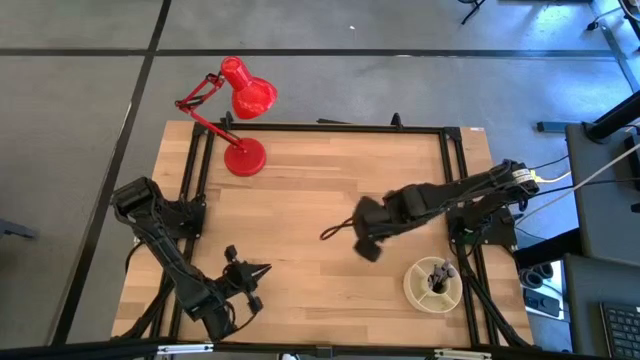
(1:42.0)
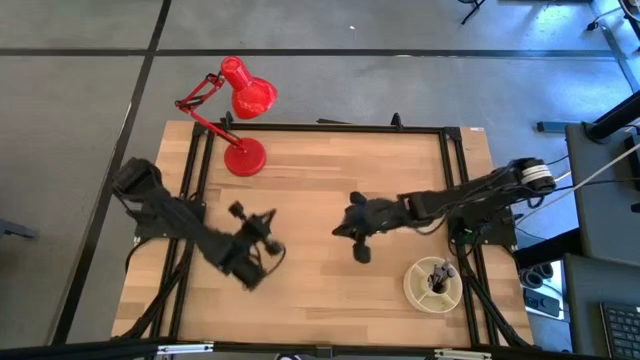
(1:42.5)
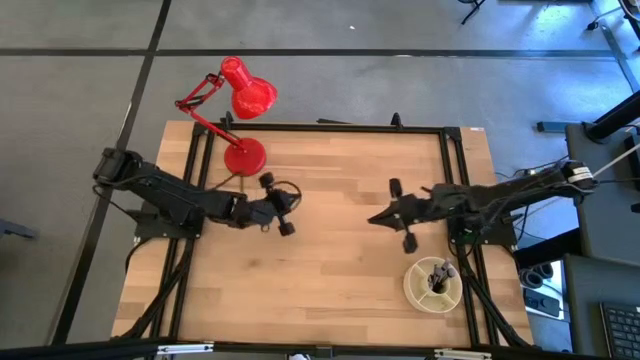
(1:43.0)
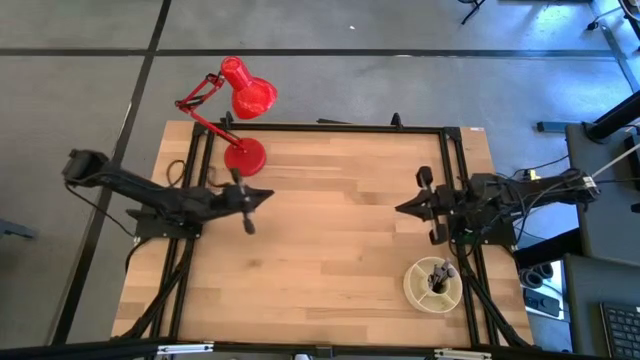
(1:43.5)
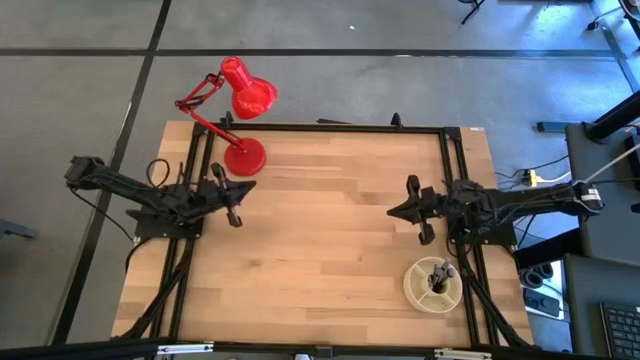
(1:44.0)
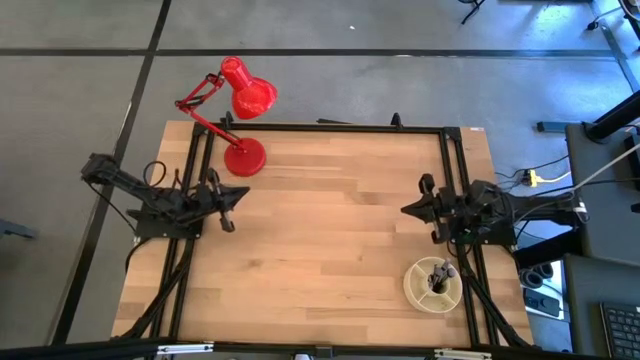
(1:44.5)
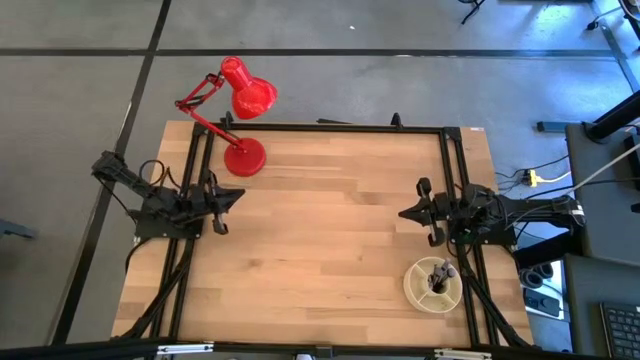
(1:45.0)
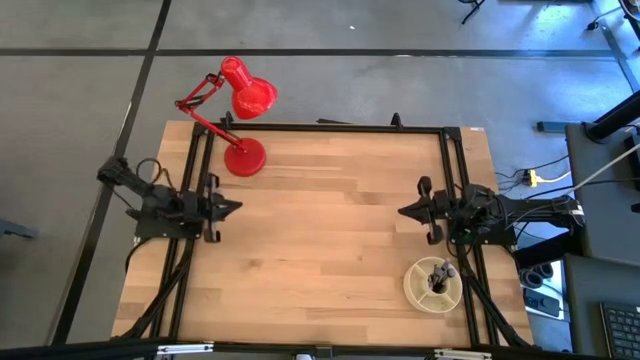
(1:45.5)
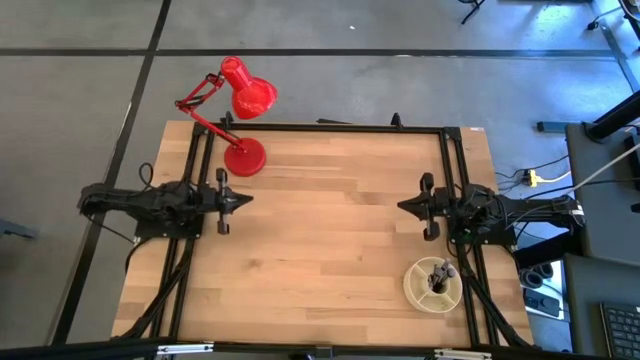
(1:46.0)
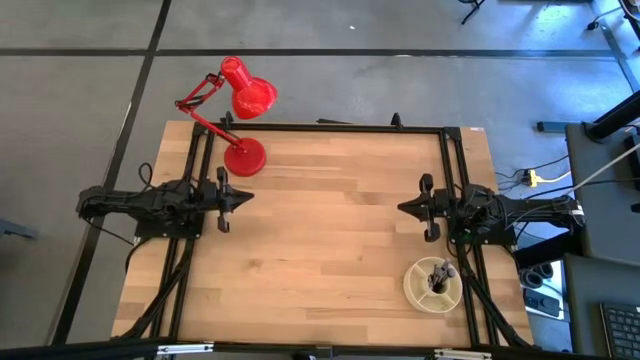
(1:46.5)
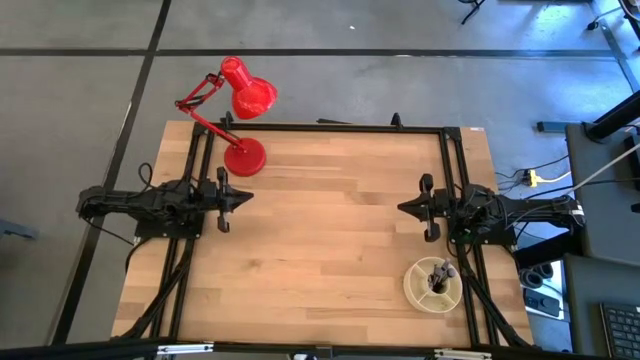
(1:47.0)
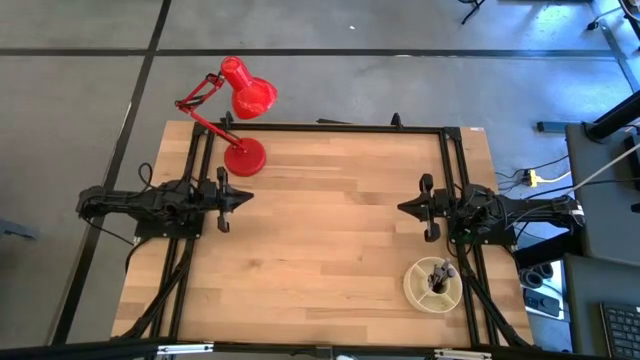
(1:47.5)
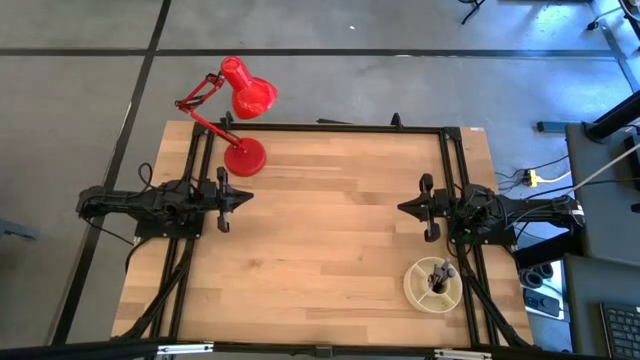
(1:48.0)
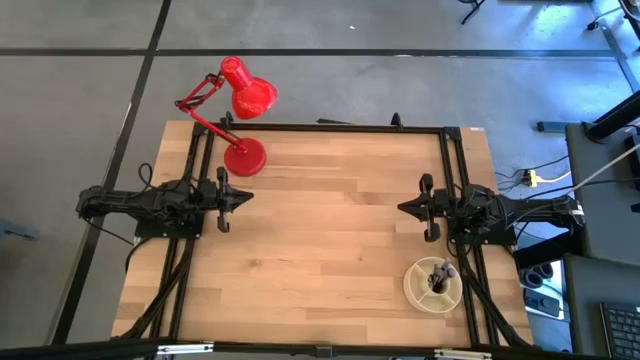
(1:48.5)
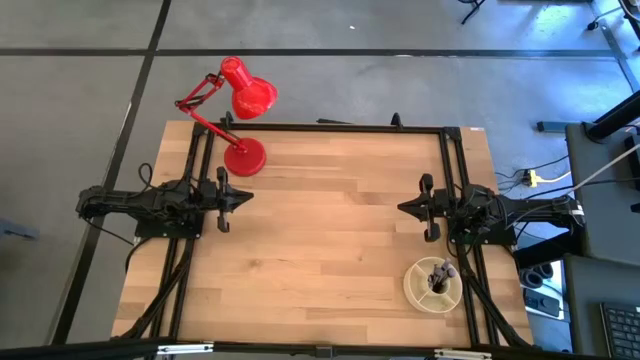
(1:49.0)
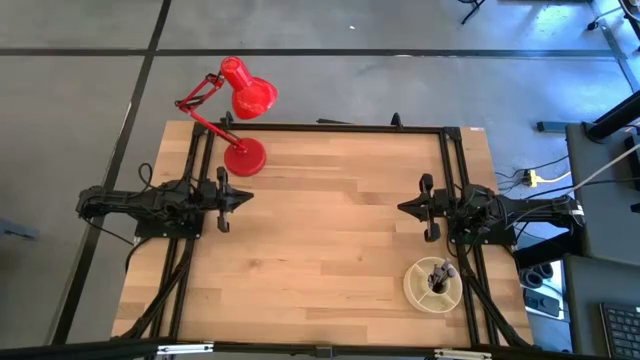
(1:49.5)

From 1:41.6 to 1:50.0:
Task: Sort items
Return to Home Position

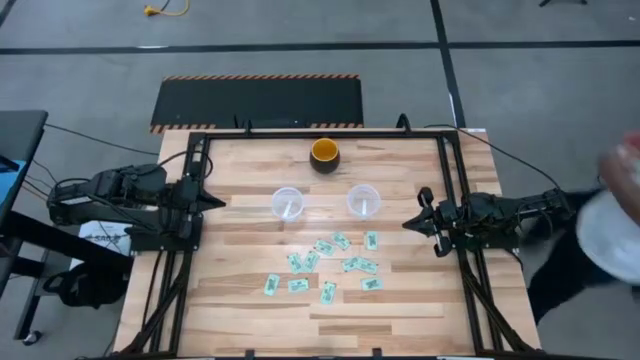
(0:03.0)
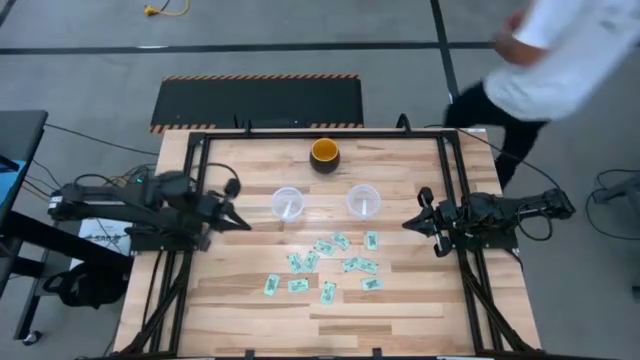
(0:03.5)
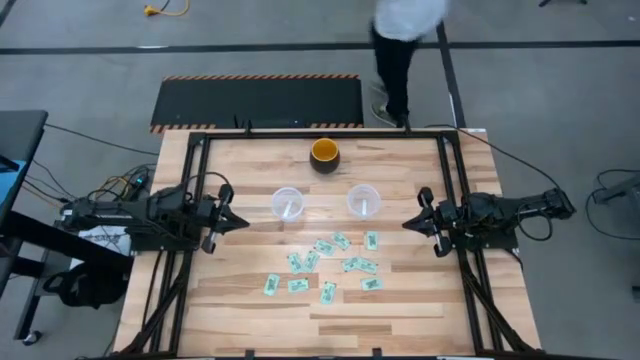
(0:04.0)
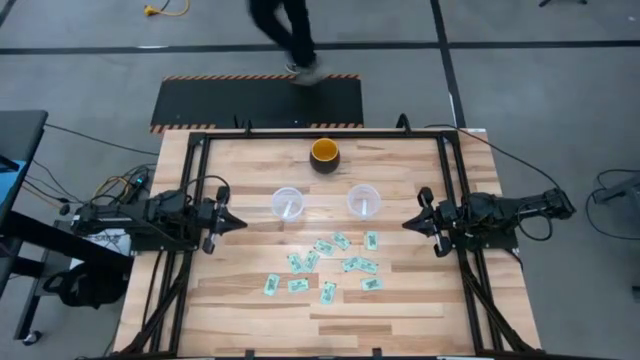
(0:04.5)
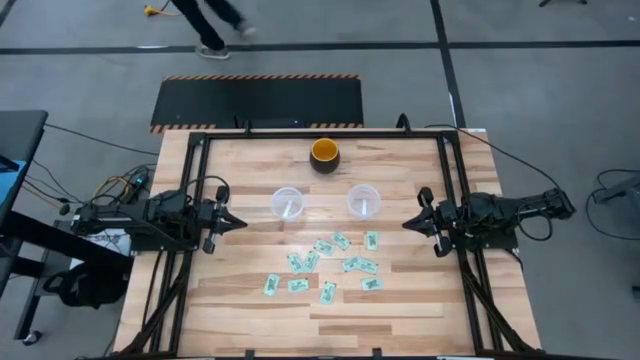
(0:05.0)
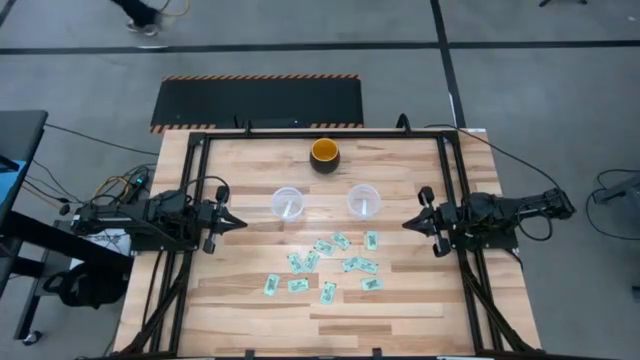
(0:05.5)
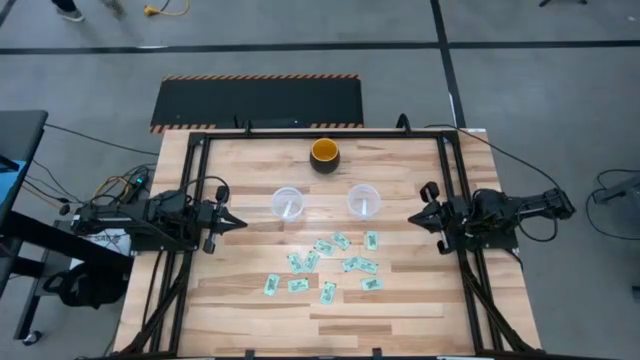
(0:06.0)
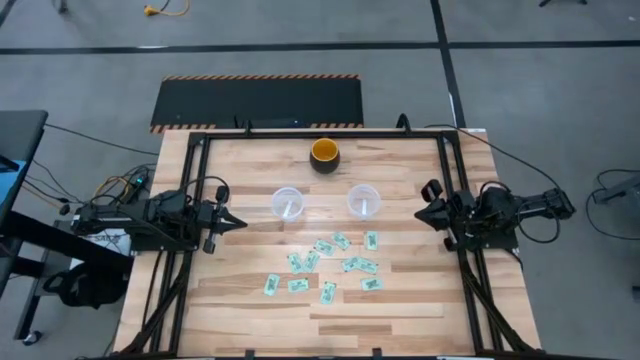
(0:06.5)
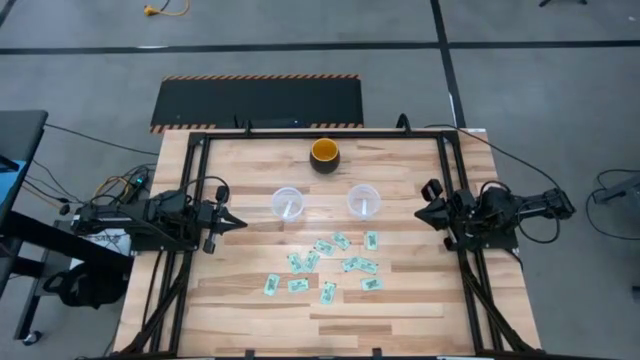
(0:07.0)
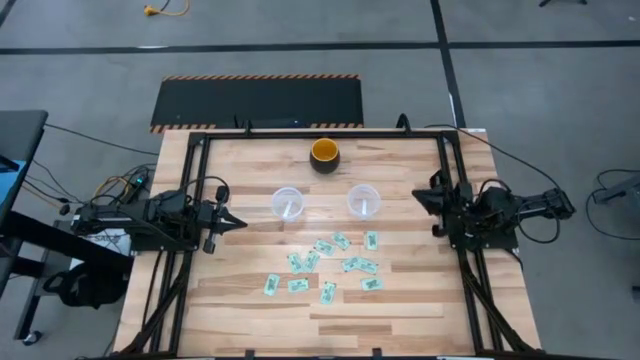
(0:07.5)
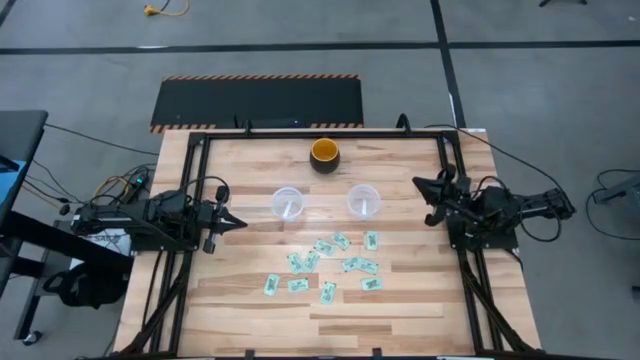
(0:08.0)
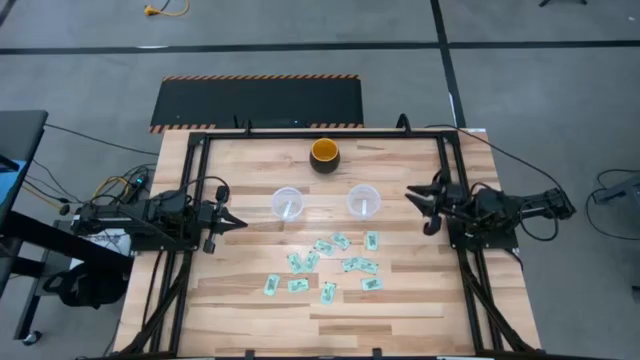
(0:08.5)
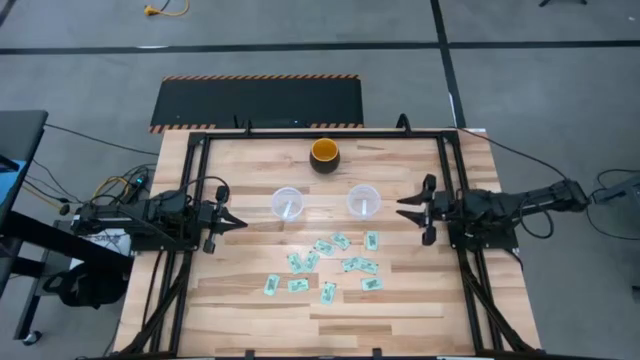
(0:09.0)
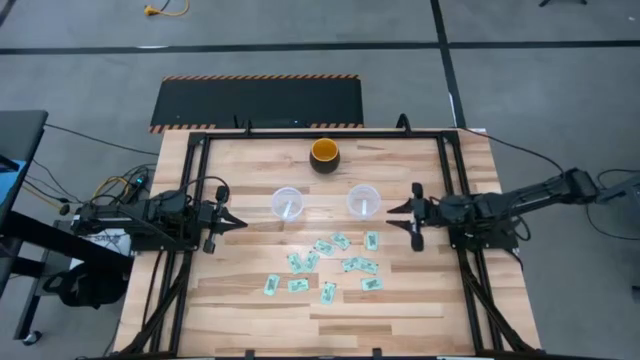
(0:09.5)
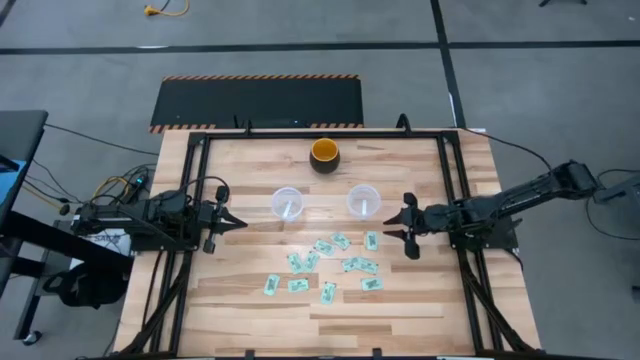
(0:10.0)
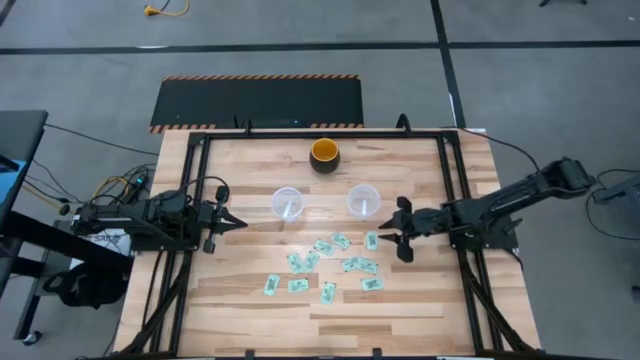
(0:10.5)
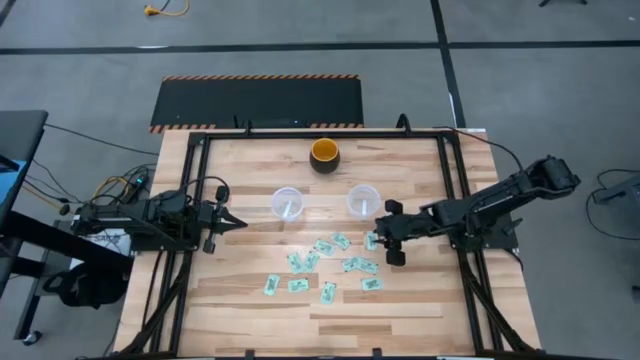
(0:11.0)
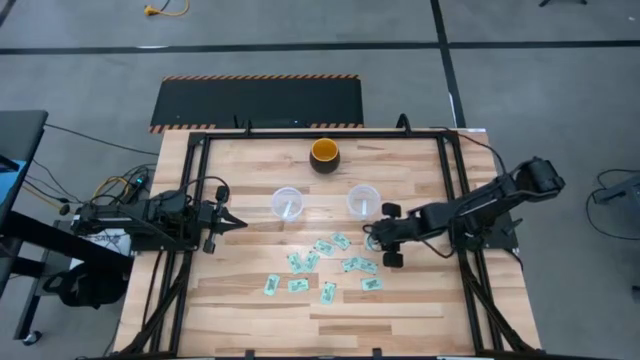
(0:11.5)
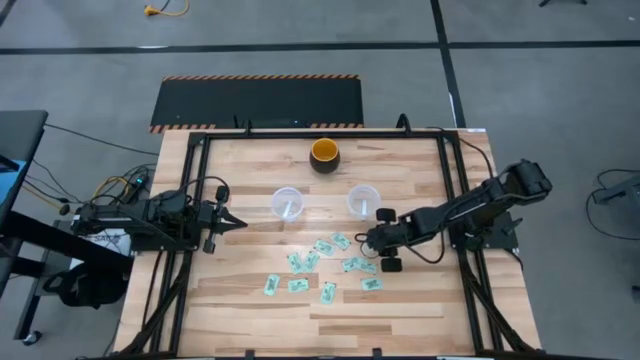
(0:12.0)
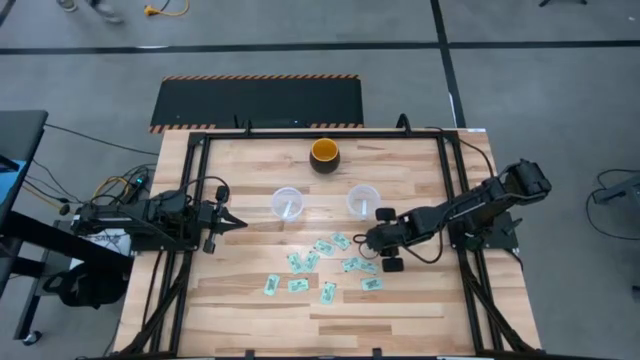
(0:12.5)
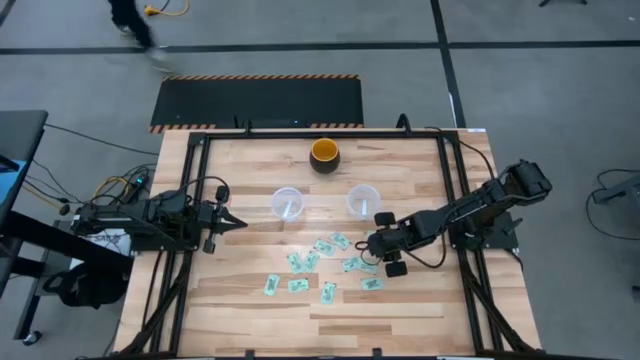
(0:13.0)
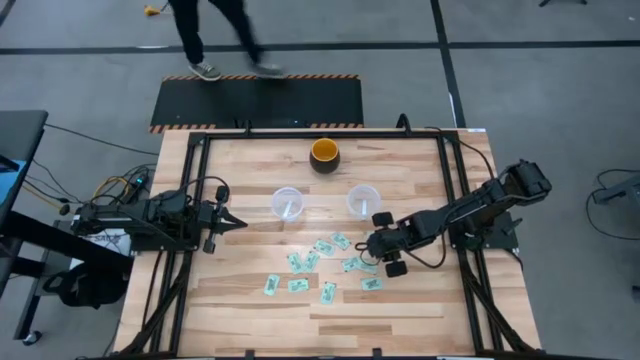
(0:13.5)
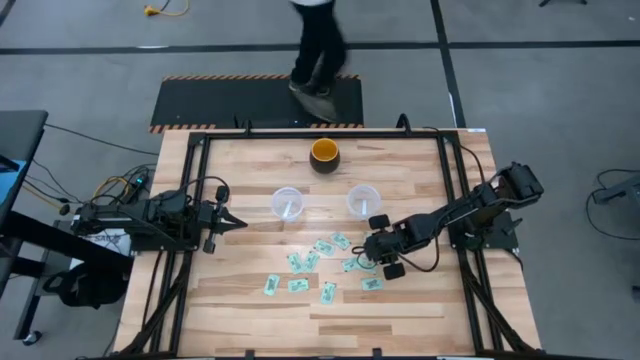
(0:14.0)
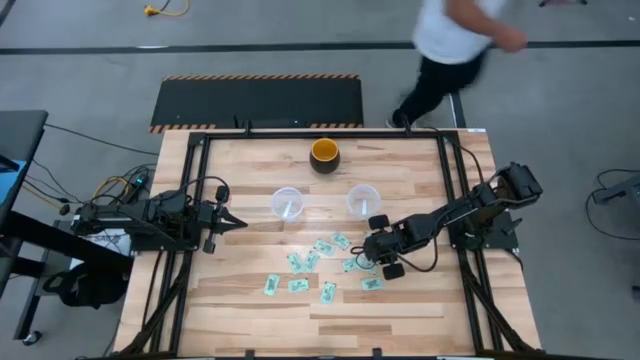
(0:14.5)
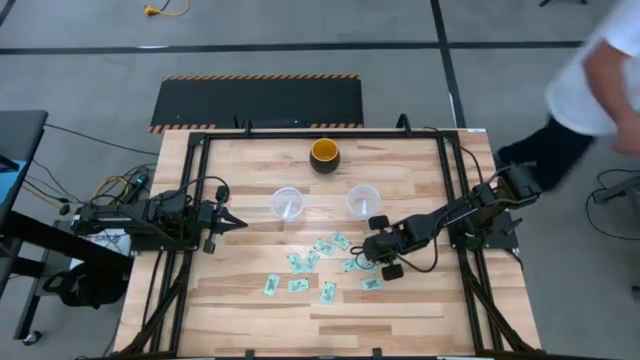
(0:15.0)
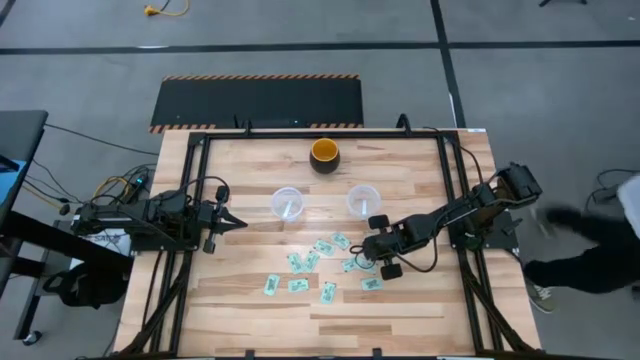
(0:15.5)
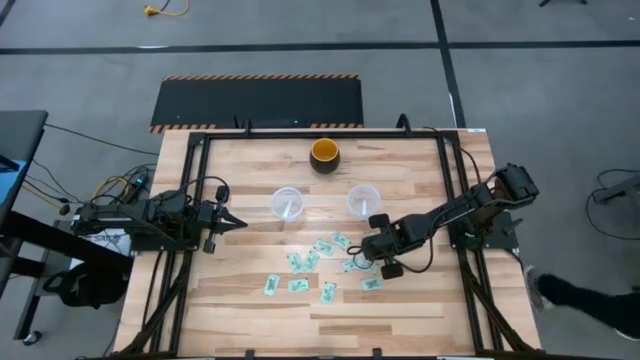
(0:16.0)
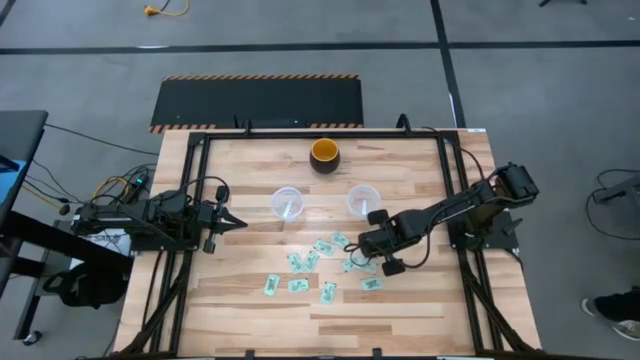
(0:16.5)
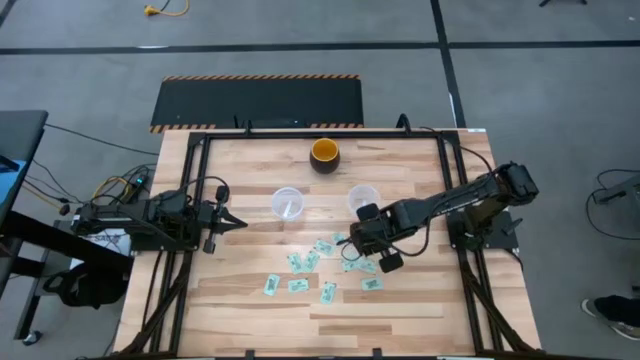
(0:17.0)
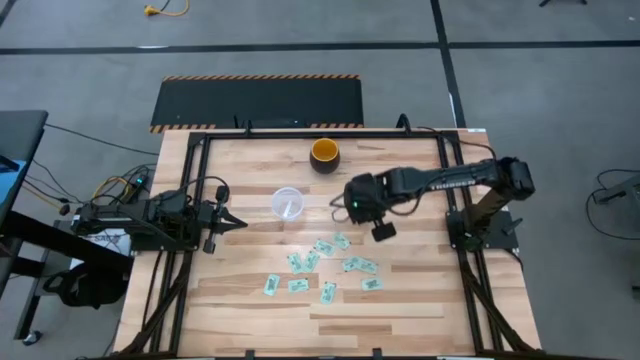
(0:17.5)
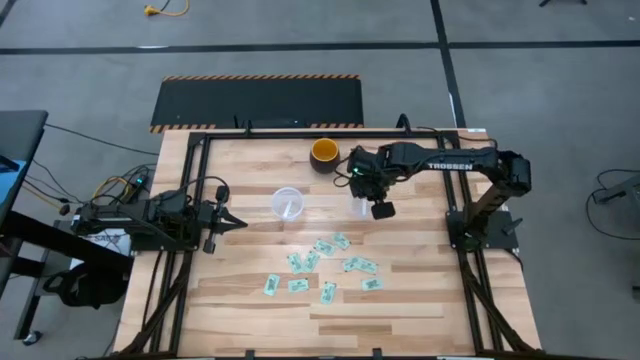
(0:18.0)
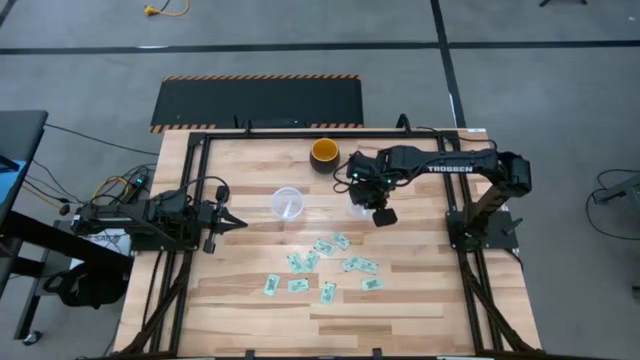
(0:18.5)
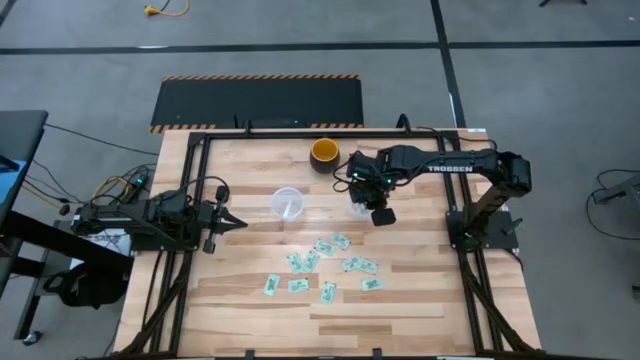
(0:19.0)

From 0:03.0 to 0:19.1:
Task: Pick and place Stevia / Truvia into bins
Put the stevia packet into the right transparent container
